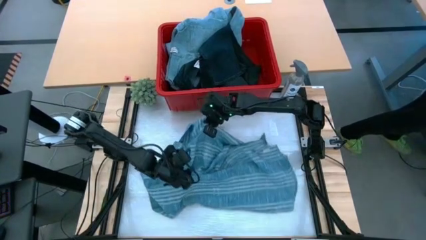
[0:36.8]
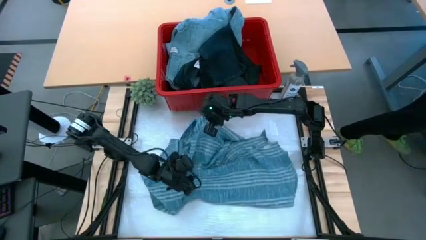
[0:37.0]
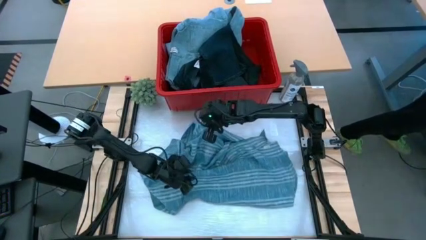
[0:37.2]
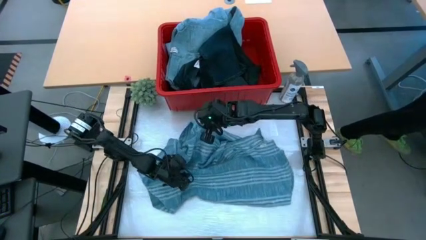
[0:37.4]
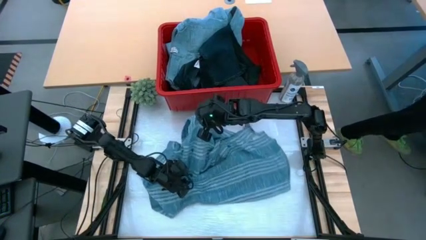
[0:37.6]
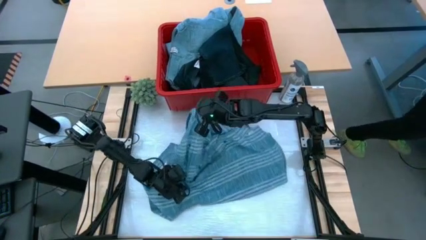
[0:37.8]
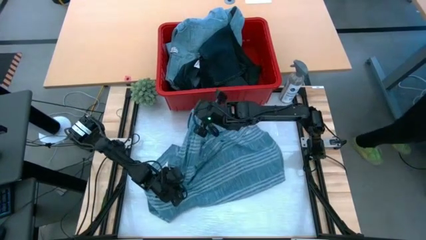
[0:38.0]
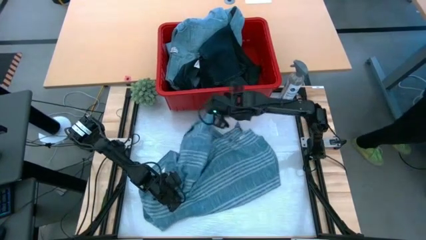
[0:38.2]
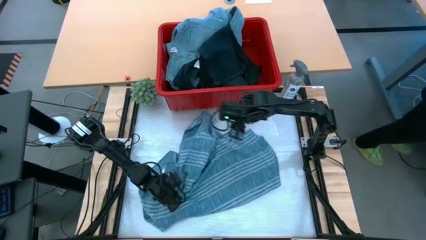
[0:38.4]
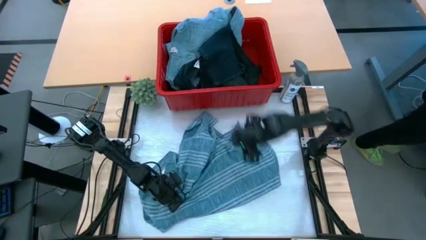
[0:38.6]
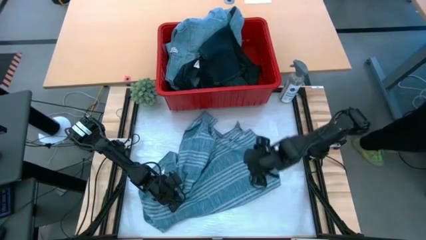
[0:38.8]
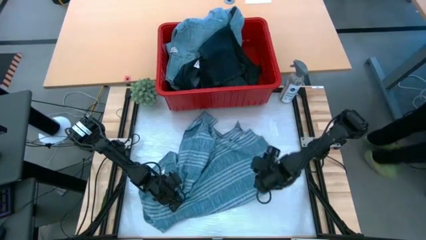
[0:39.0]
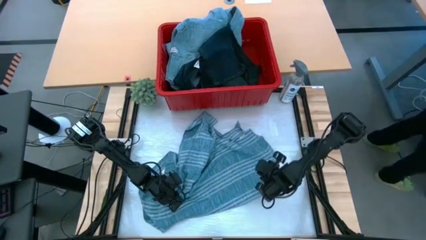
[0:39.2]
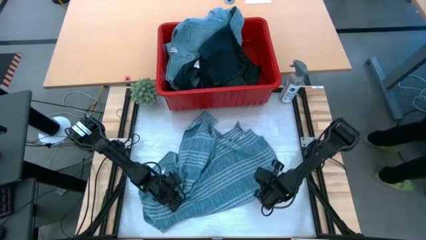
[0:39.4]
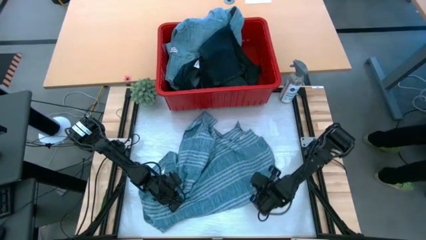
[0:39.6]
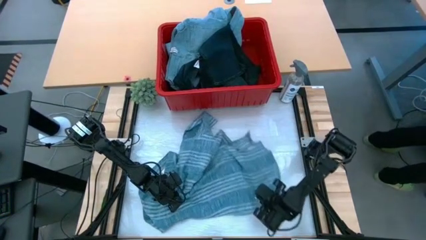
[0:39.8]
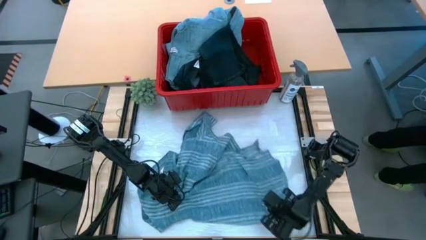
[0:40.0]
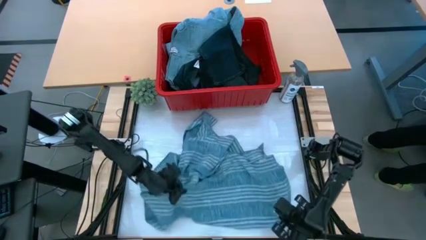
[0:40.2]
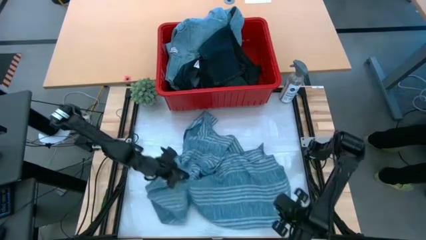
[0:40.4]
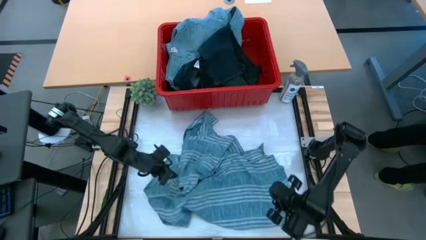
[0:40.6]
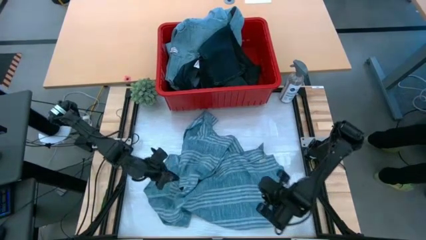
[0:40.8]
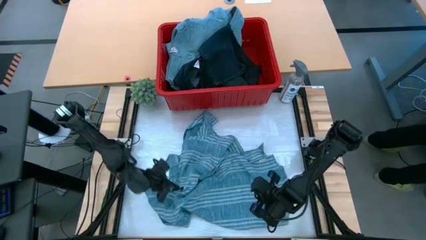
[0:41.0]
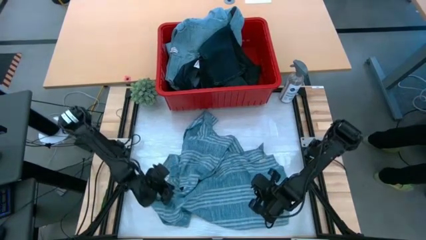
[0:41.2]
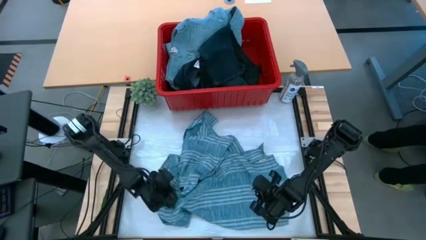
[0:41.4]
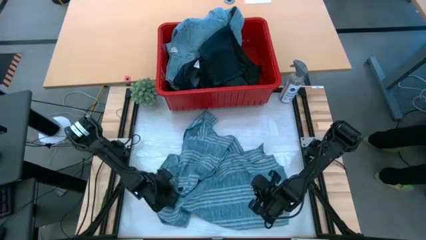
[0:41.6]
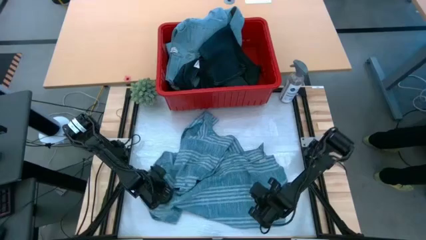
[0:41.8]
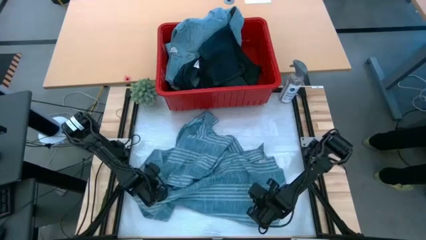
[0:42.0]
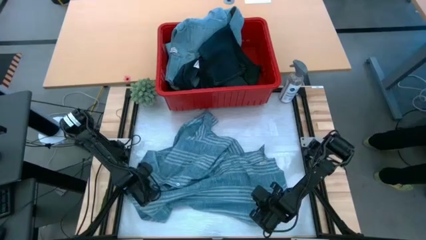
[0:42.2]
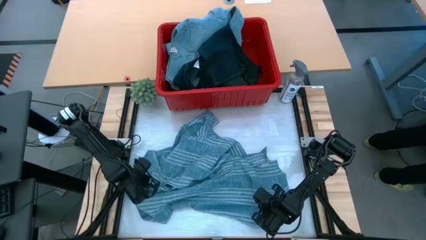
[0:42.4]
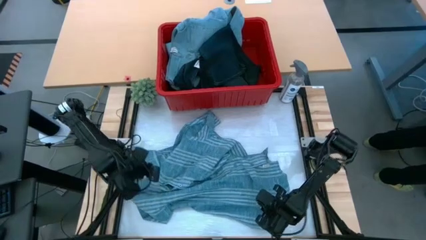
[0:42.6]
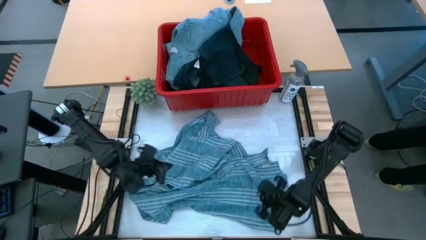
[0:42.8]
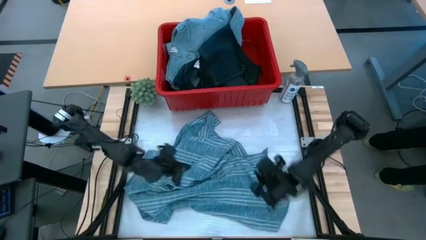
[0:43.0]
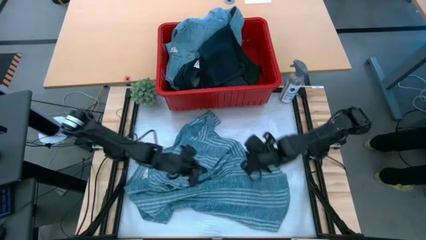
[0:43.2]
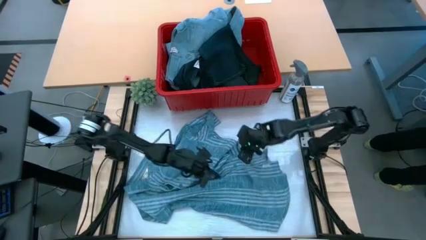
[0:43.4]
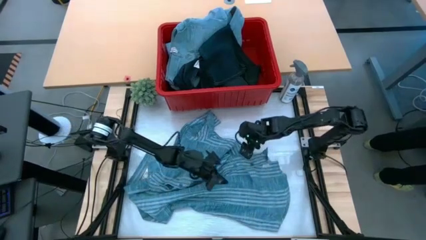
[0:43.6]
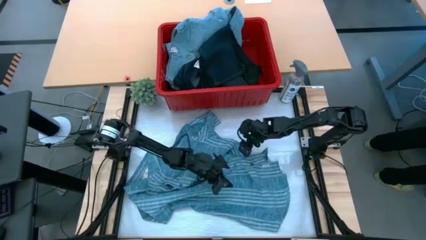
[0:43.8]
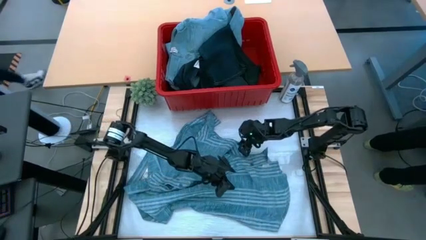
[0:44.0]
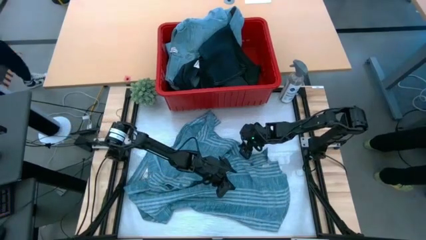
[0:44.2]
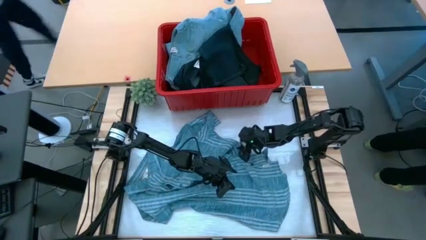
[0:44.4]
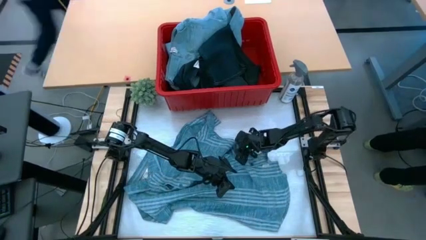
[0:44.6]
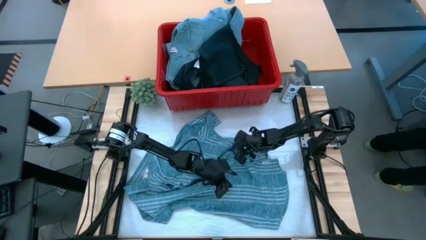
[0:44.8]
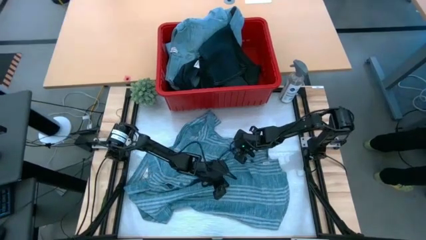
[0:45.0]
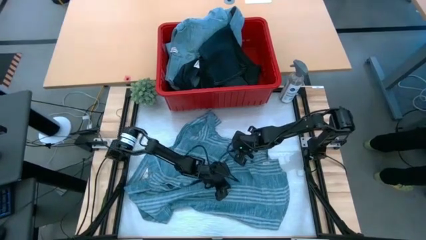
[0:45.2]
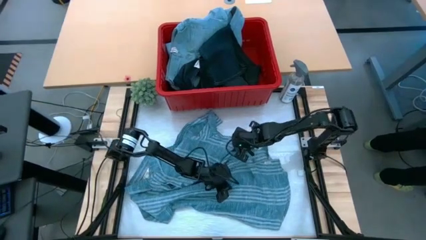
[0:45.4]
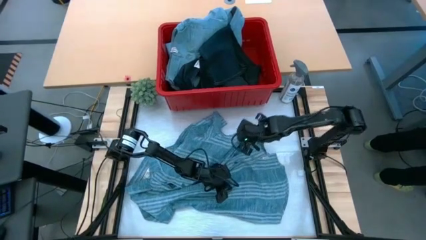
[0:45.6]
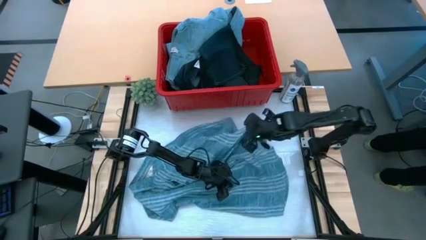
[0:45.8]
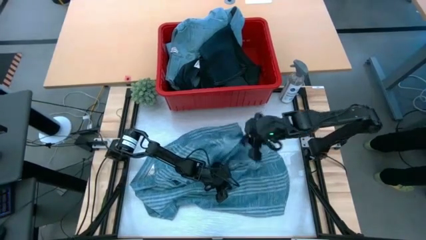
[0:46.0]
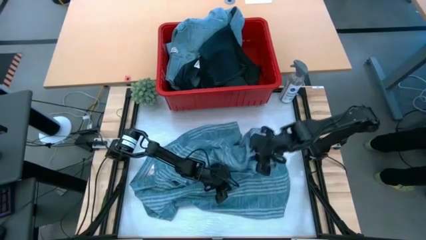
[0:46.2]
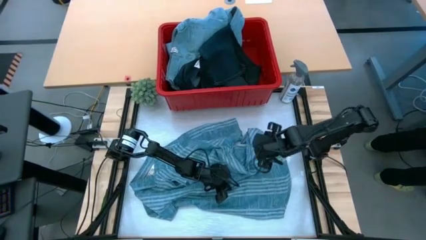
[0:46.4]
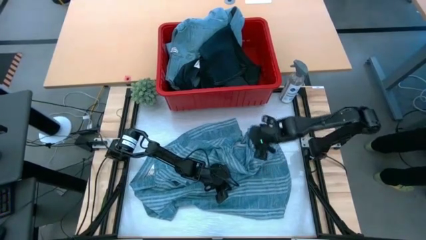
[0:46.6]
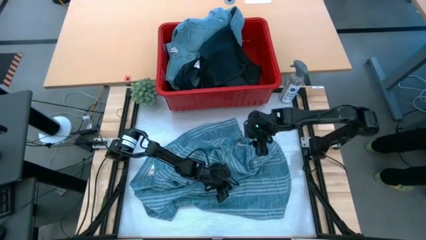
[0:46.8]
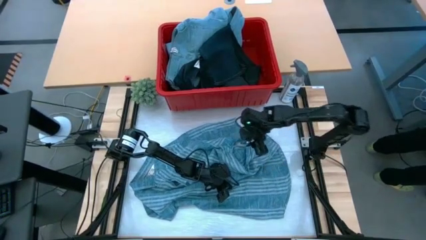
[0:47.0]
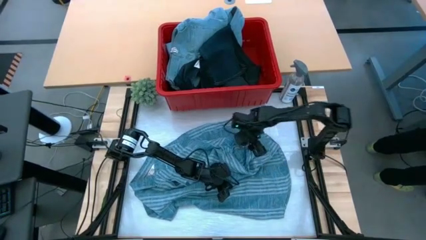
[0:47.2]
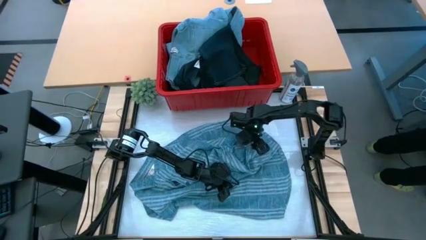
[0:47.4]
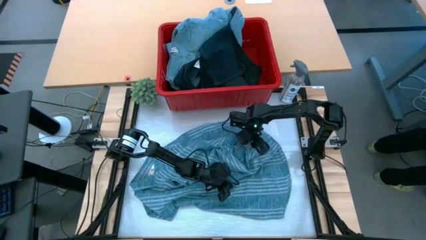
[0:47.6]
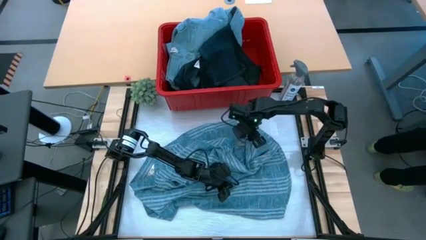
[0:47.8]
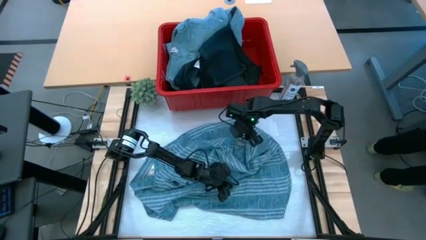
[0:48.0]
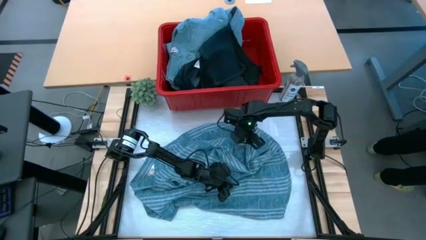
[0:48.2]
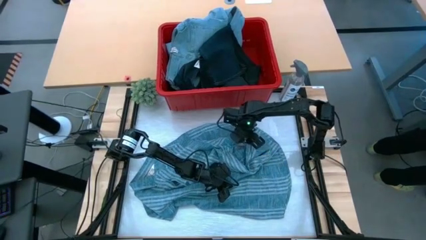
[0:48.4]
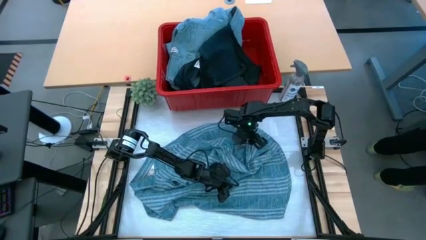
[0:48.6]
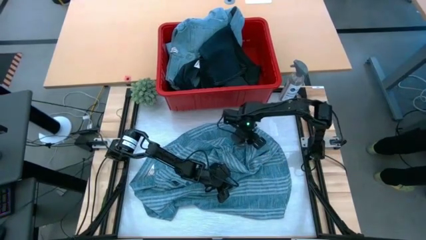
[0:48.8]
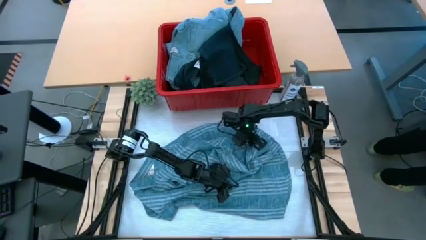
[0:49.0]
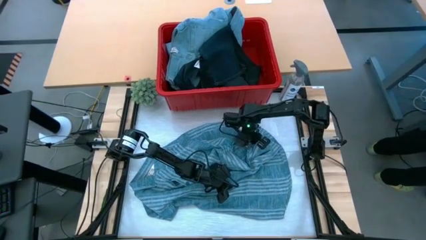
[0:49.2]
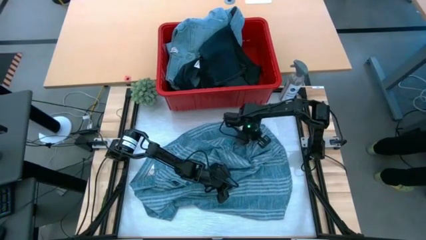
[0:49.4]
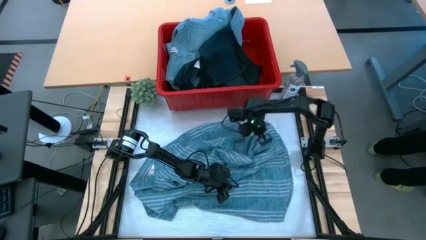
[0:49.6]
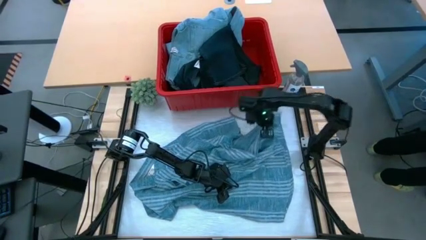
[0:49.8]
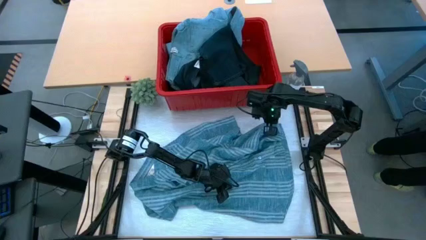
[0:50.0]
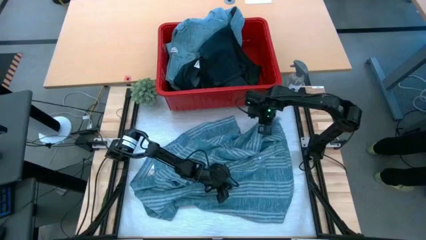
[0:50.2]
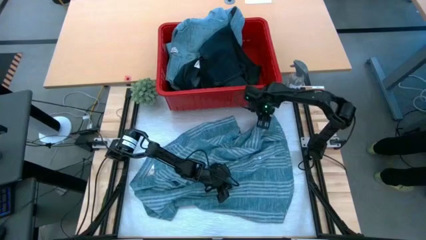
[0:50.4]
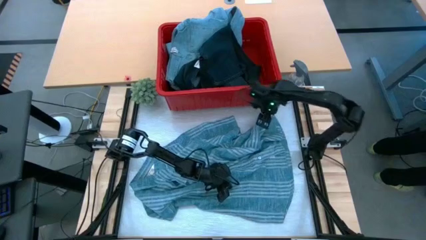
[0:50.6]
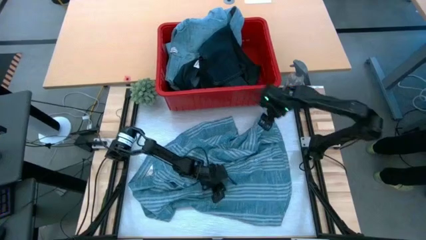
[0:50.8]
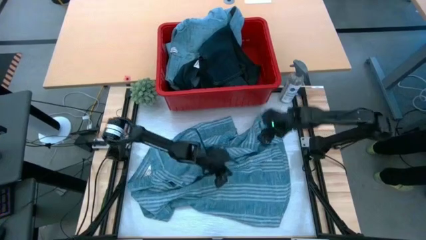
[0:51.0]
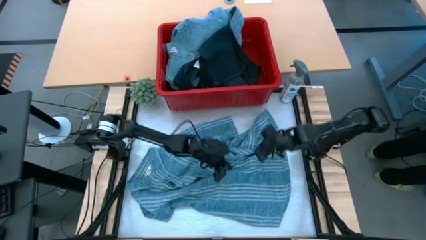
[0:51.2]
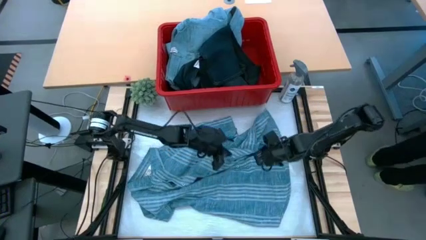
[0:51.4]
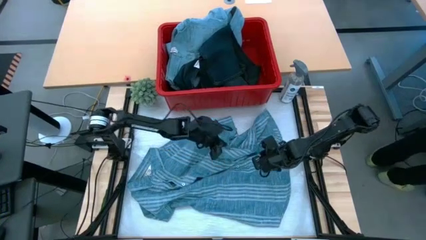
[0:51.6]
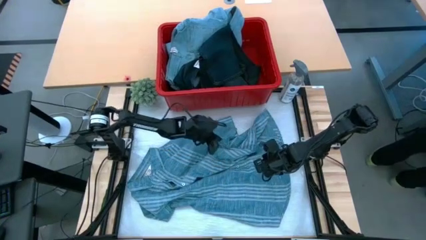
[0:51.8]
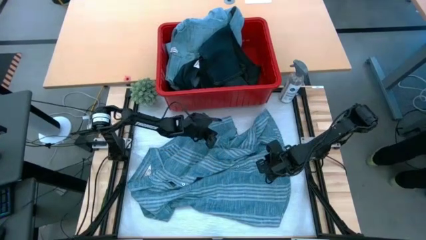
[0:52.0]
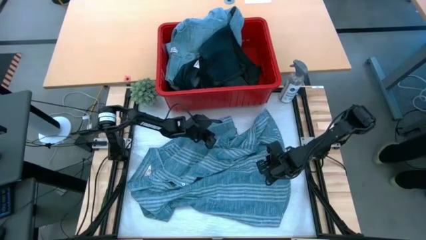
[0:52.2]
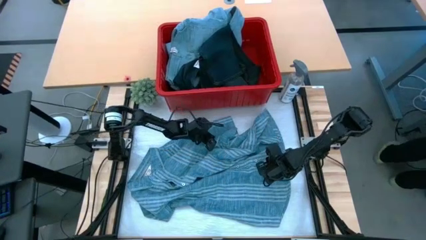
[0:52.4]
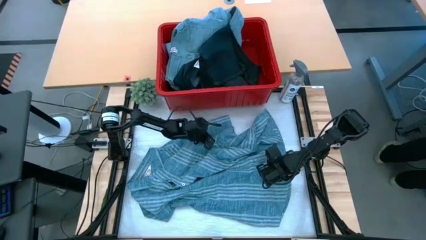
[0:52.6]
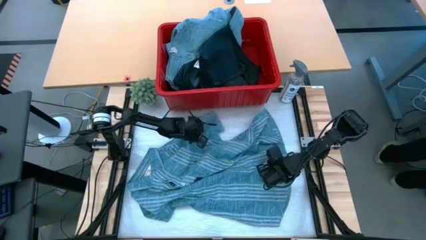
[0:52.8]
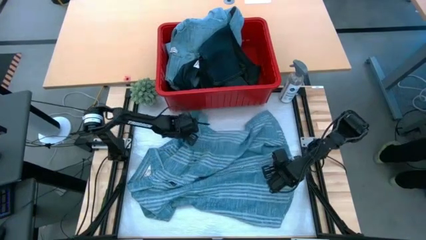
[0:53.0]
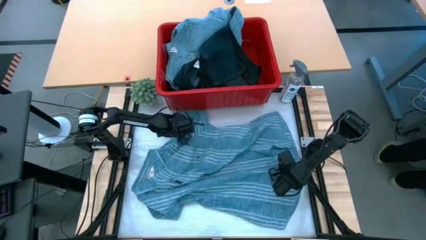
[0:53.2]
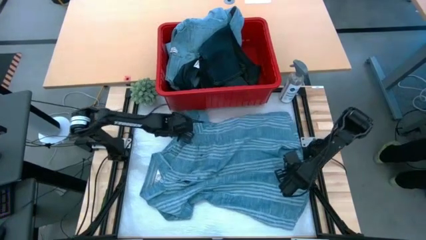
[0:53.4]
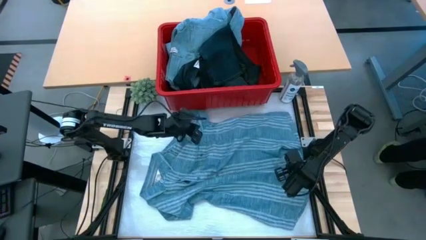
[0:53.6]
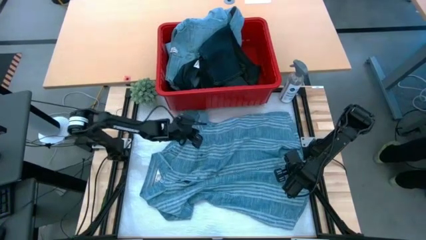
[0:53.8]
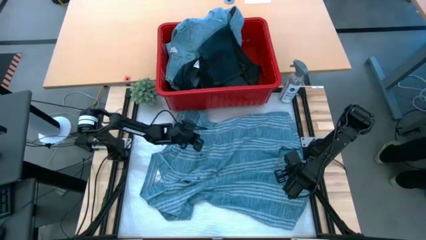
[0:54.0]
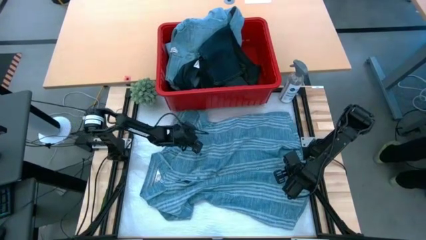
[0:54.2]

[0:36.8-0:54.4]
Task: Fold Laundry from Bin
Fold the blue polo shirt
